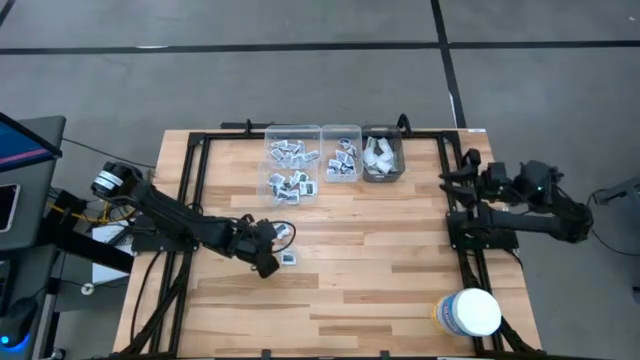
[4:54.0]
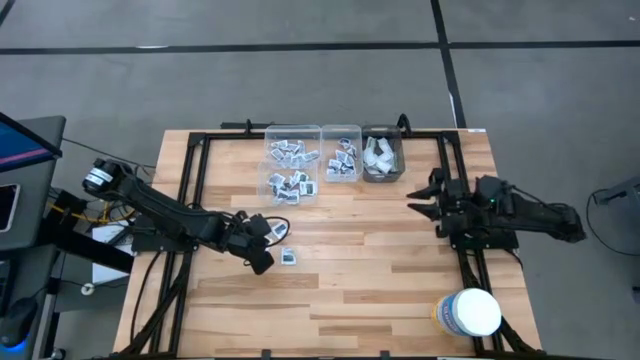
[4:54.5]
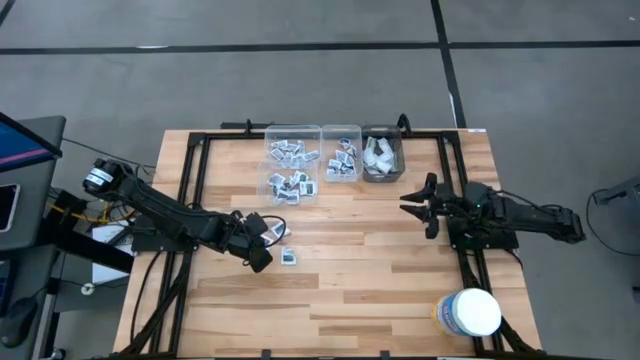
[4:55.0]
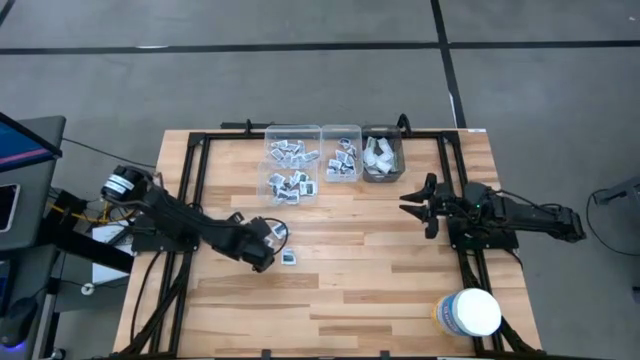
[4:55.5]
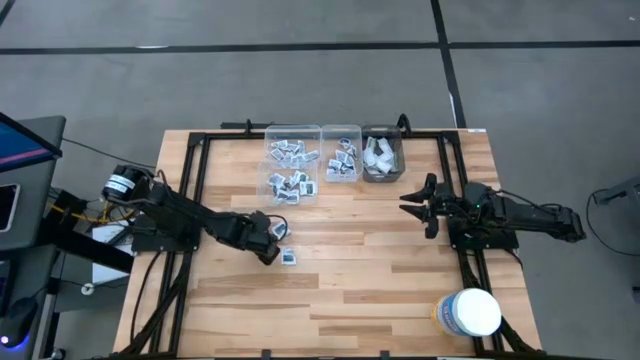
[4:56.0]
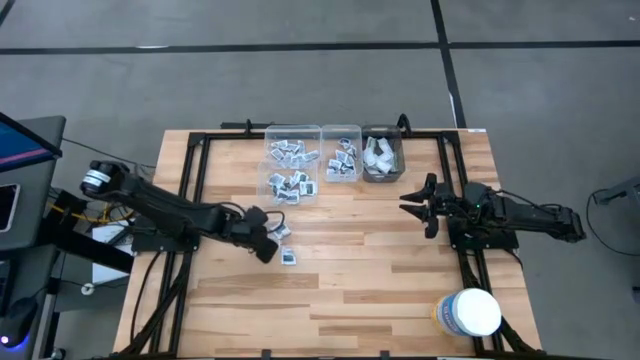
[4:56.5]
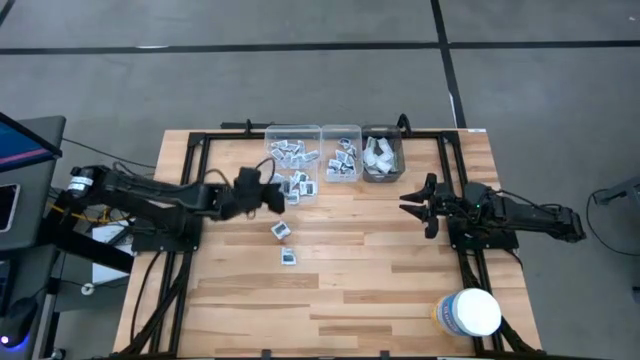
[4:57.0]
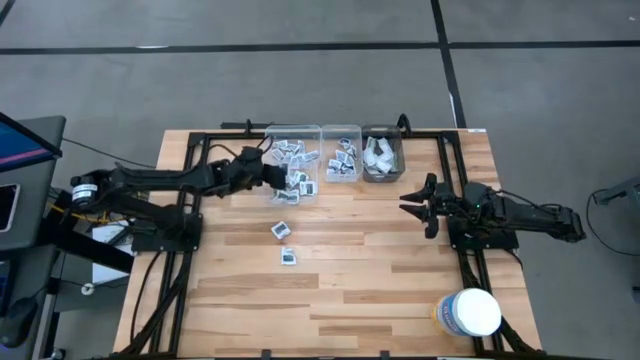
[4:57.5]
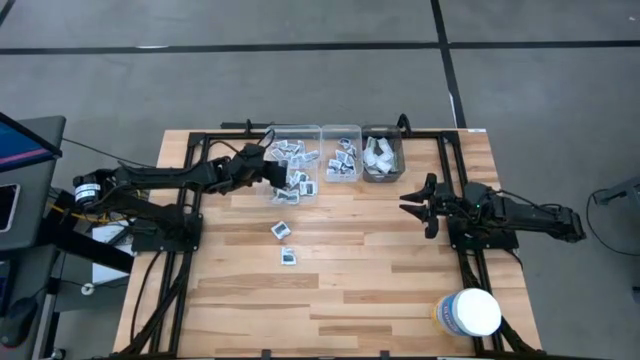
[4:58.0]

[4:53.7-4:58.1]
Task: Pick & Place First Aid Supplies
Put the towelette pack into the bottom transparent bin

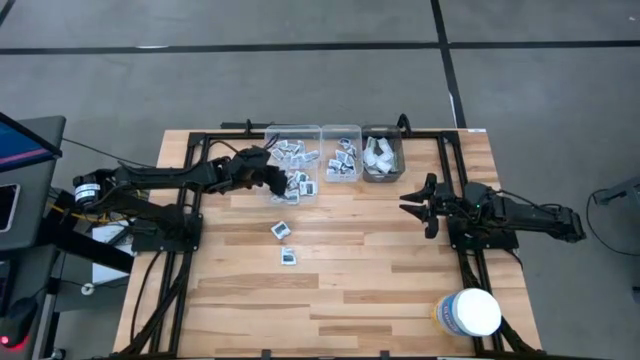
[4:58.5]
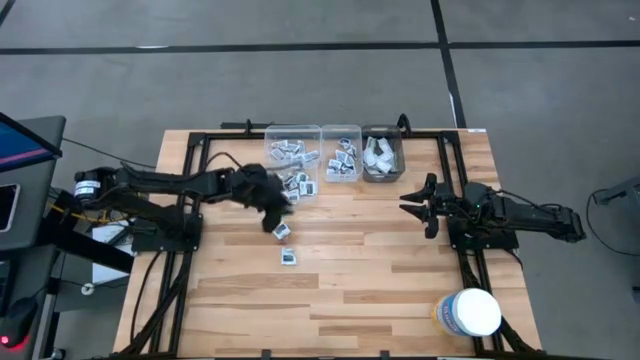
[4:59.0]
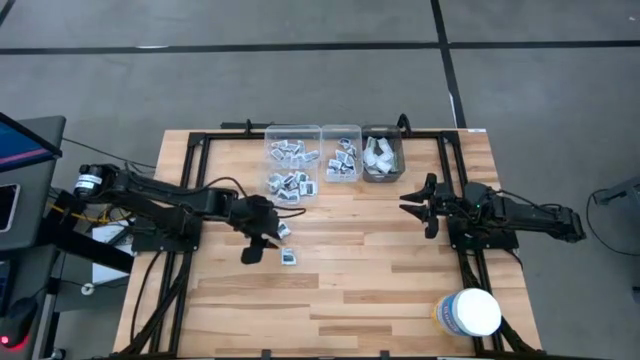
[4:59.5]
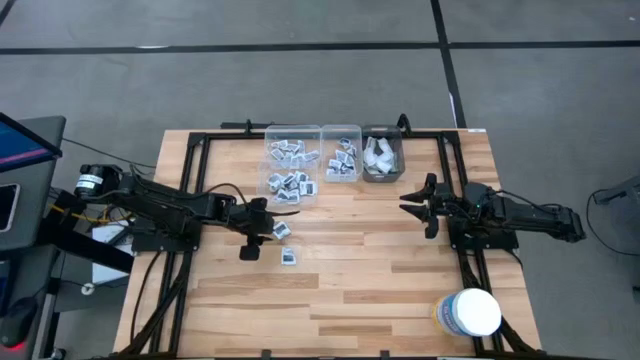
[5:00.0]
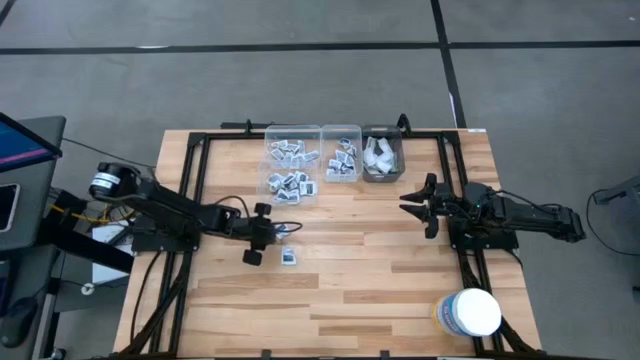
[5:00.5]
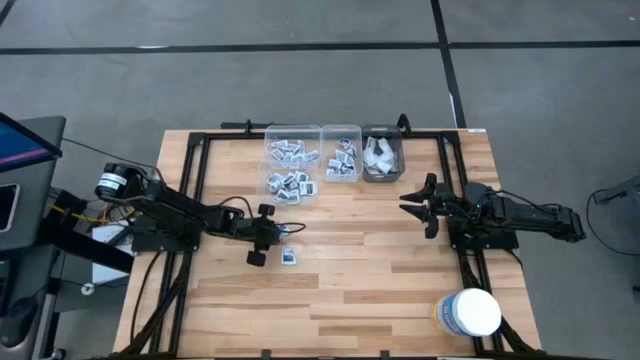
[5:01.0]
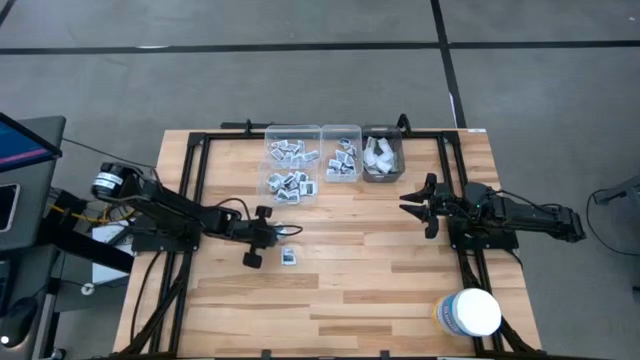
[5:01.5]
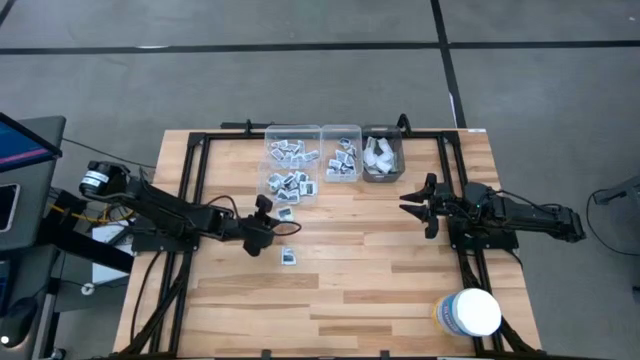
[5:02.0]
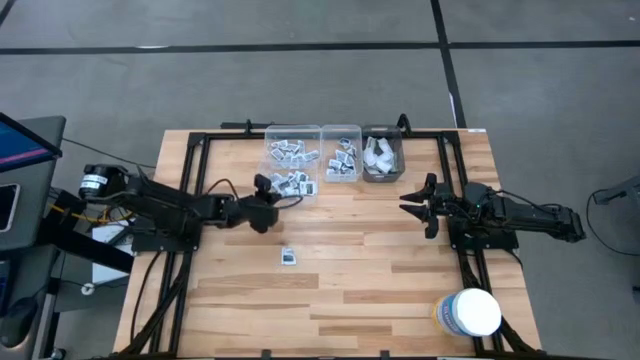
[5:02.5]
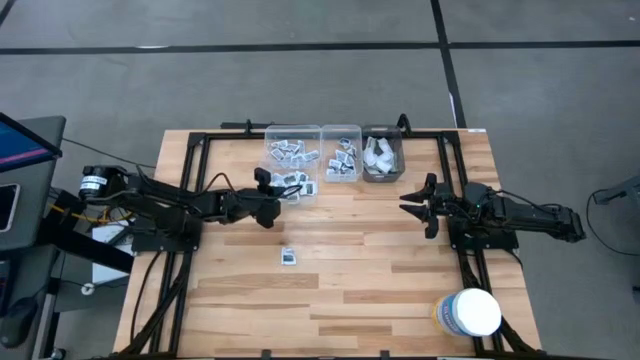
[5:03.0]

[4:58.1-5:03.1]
Put the towelette pack into the bottom transparent bin

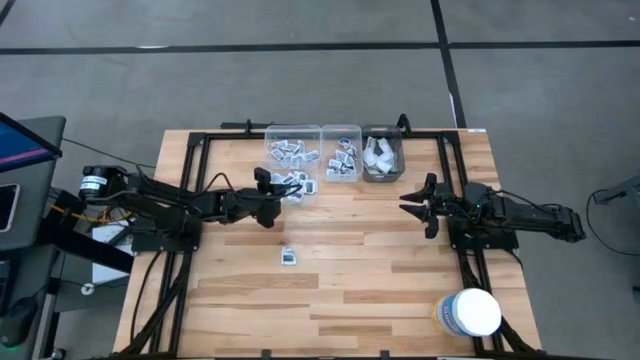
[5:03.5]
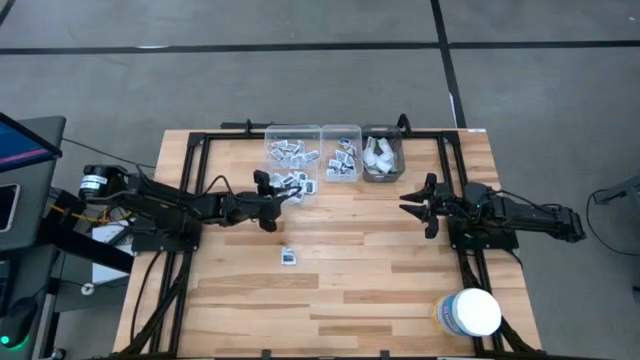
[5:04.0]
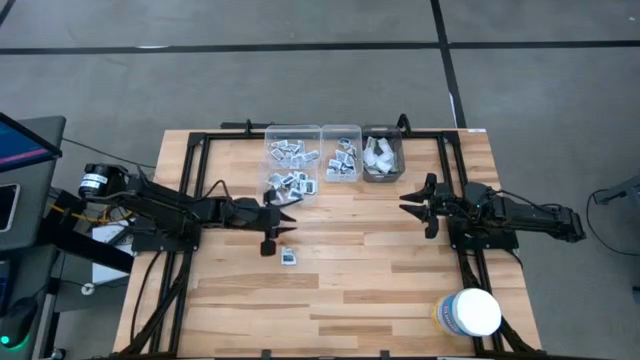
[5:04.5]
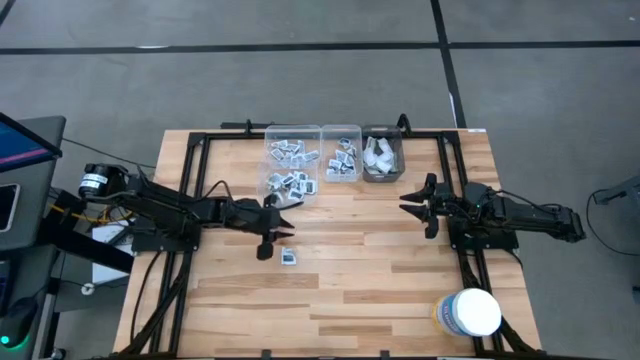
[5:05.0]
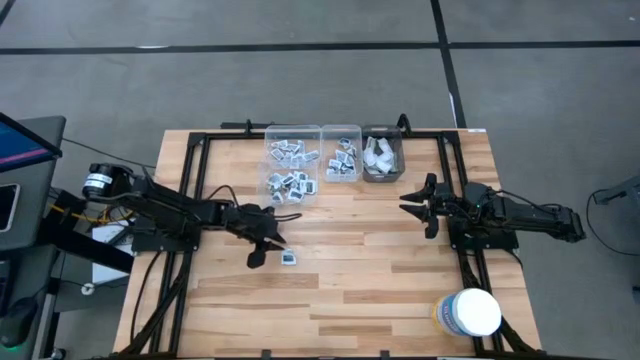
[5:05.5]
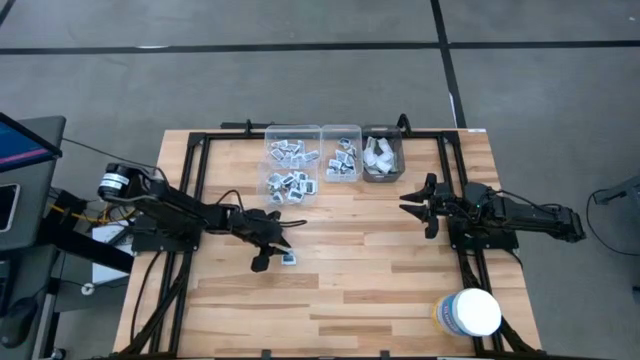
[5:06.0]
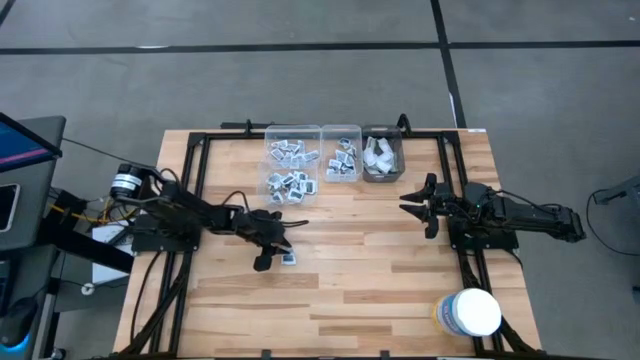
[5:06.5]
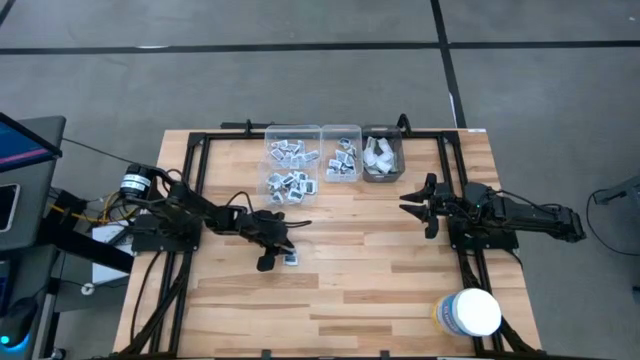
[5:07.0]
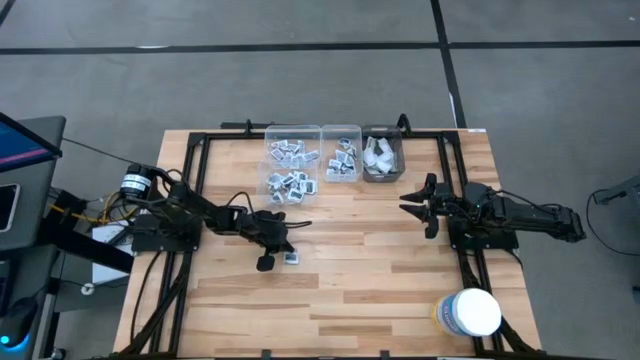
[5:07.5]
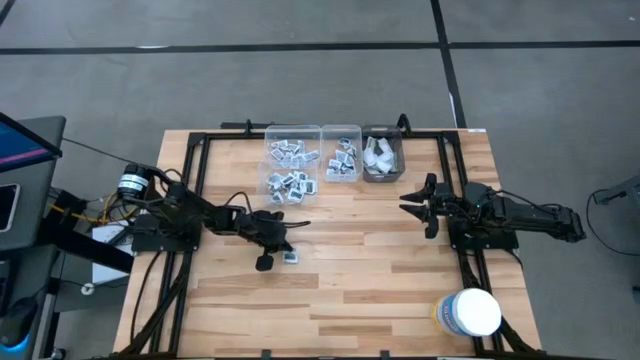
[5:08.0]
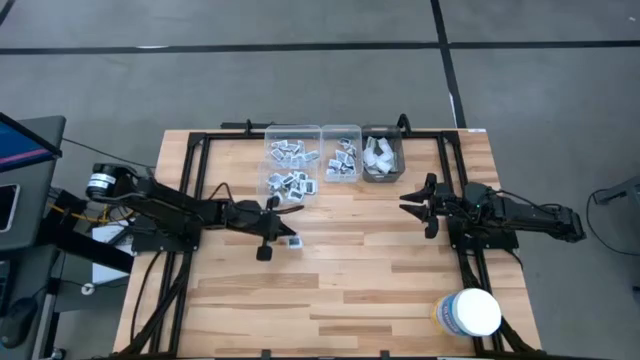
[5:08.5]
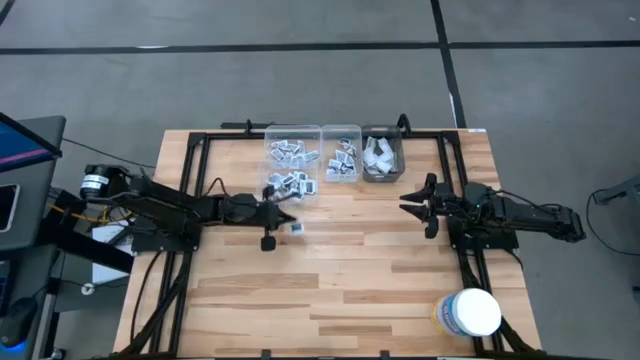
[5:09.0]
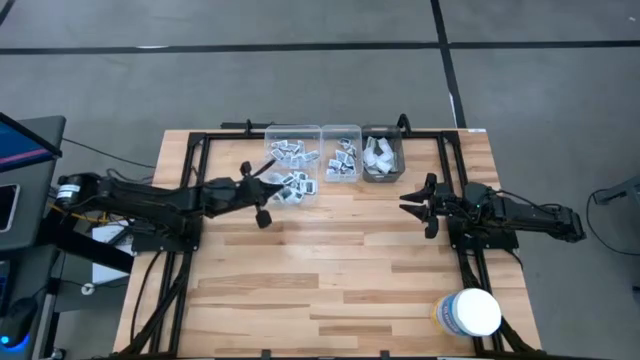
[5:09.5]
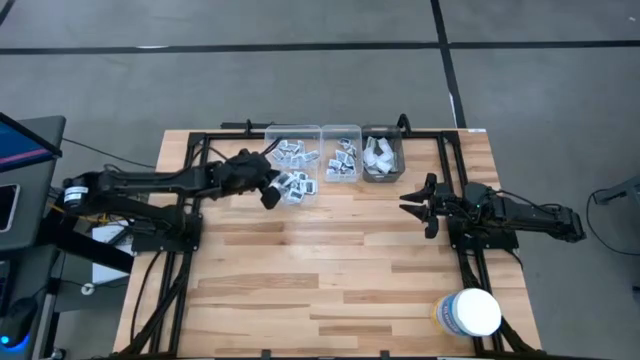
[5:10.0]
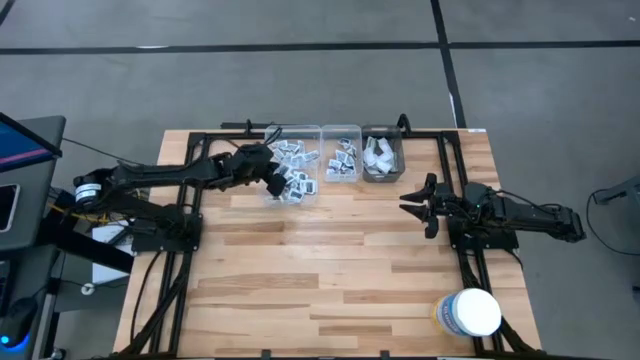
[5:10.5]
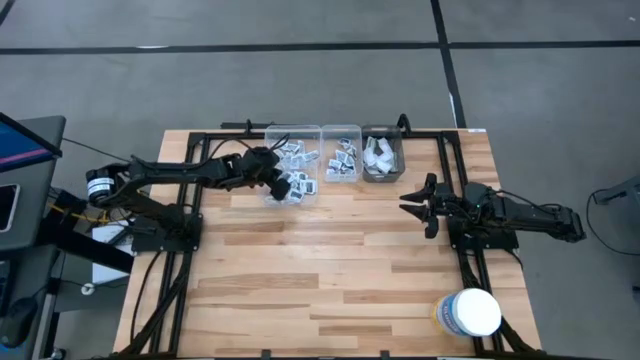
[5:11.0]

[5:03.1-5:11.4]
Put the towelette pack into the bottom transparent bin

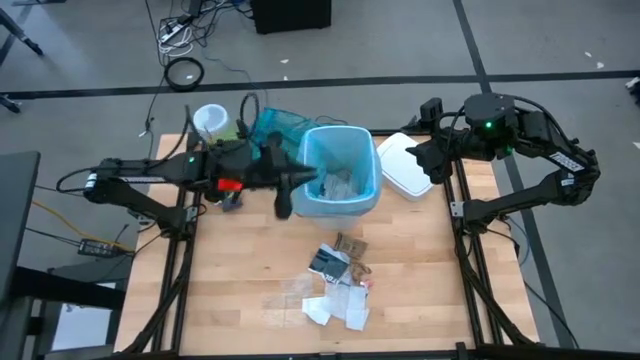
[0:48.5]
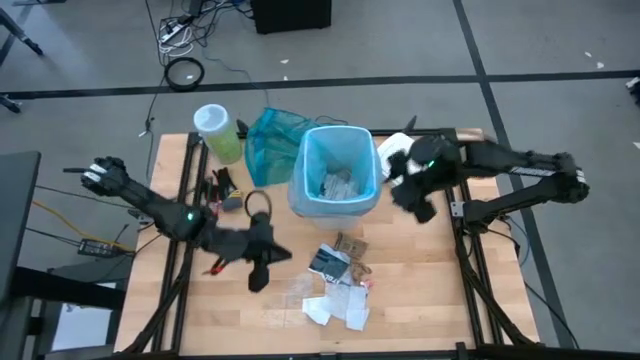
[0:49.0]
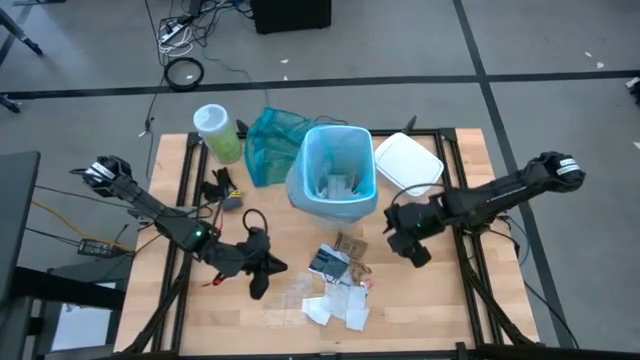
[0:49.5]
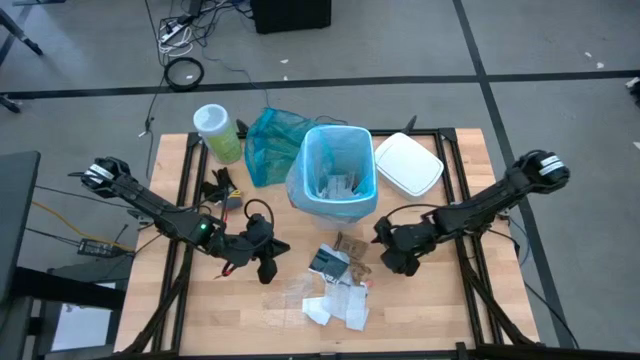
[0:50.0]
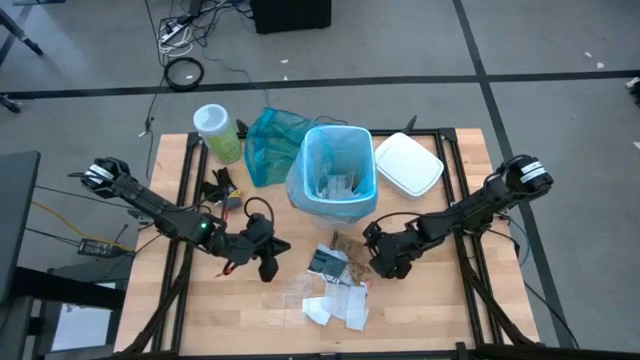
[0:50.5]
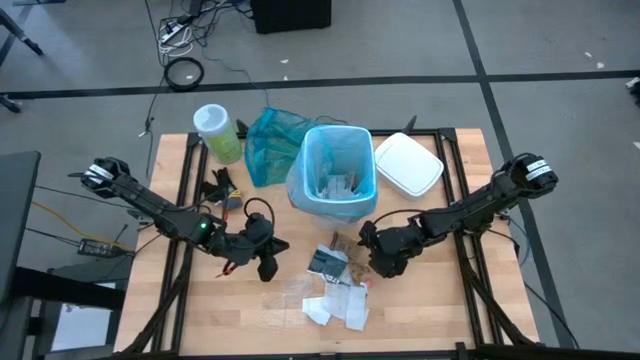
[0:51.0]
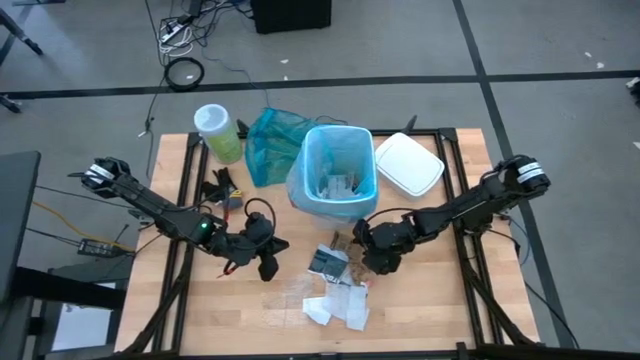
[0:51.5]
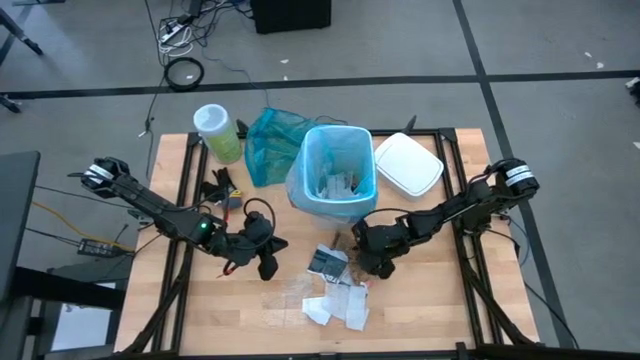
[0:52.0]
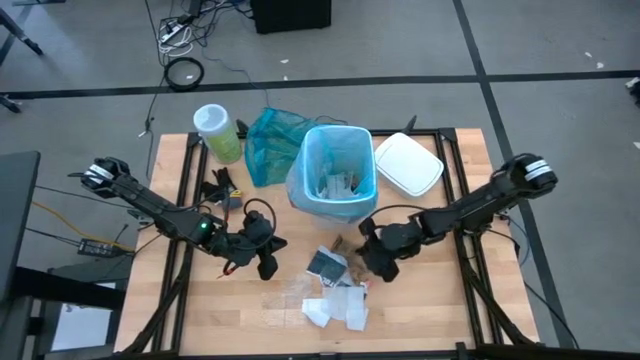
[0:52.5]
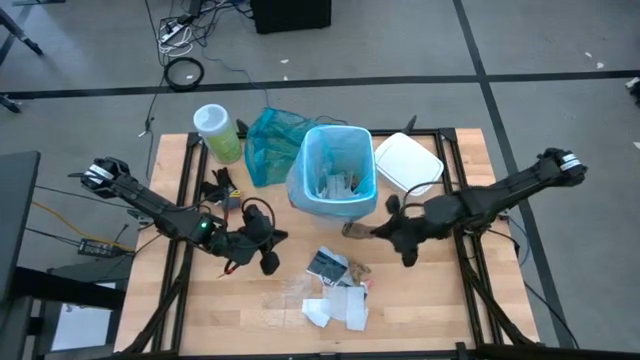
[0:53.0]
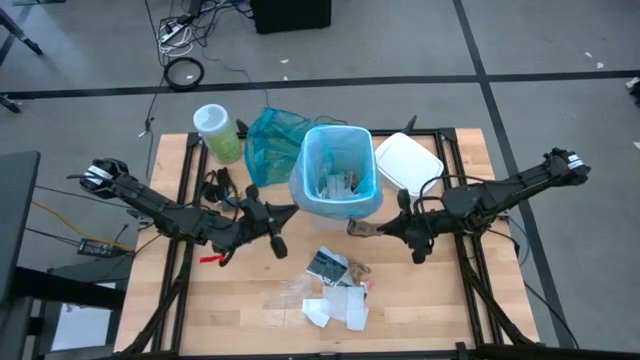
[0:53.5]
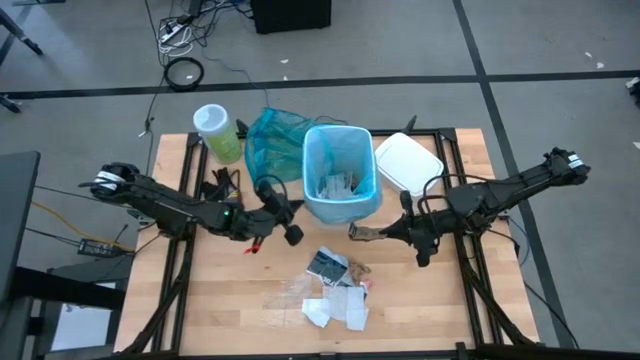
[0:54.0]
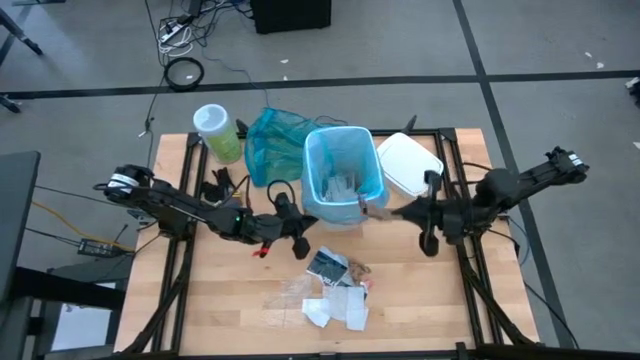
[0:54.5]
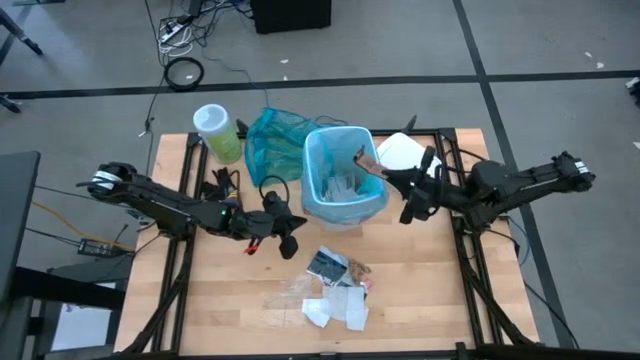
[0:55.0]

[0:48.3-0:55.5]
Task: place trash/remove bag and relplace
Put the brown cardboard into the white trash bin
